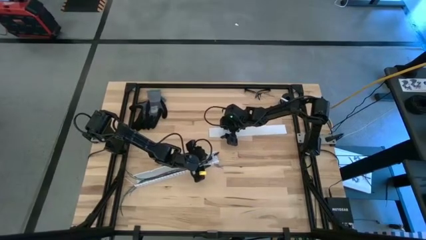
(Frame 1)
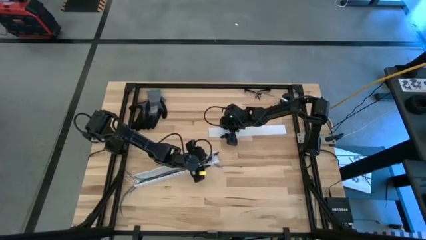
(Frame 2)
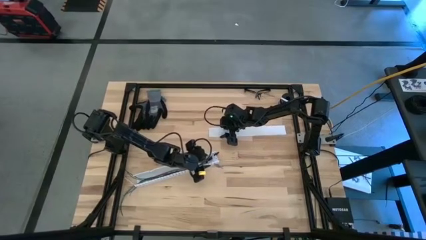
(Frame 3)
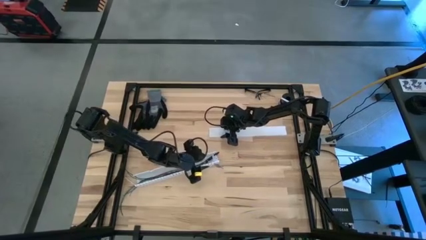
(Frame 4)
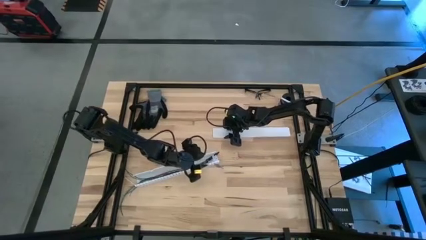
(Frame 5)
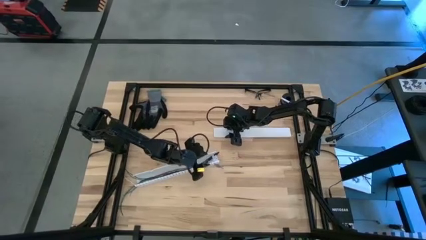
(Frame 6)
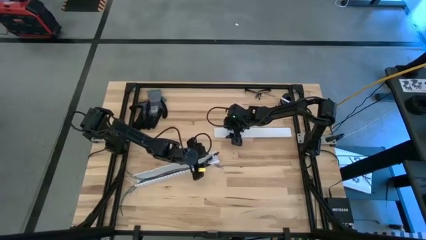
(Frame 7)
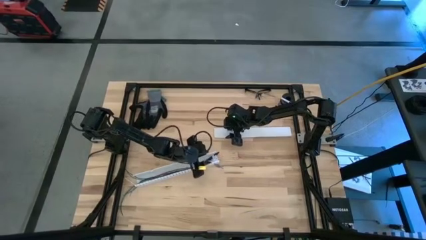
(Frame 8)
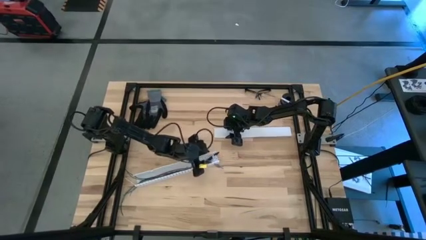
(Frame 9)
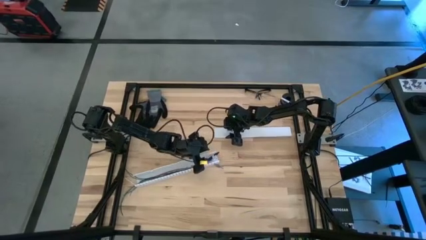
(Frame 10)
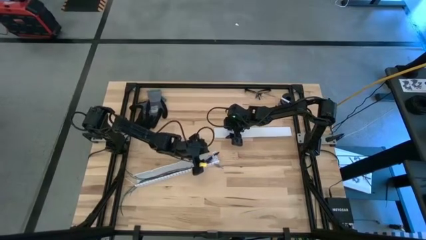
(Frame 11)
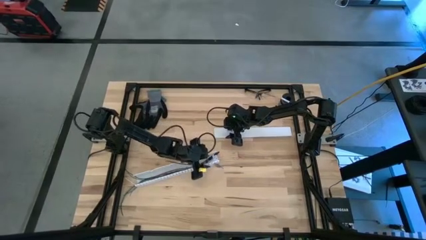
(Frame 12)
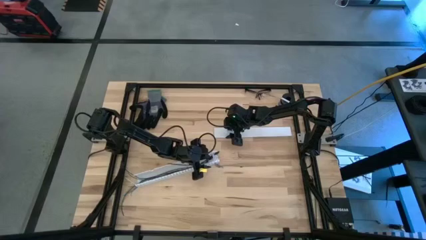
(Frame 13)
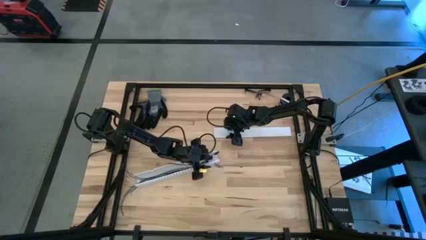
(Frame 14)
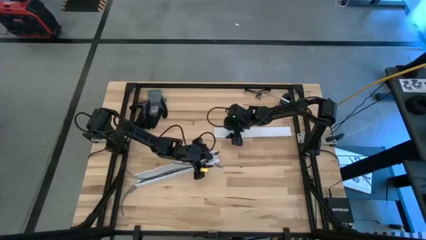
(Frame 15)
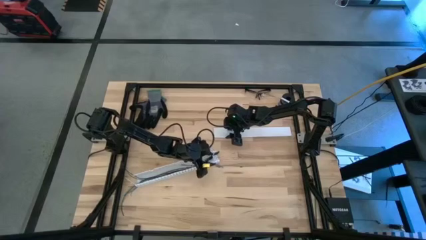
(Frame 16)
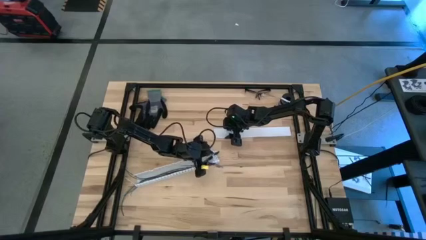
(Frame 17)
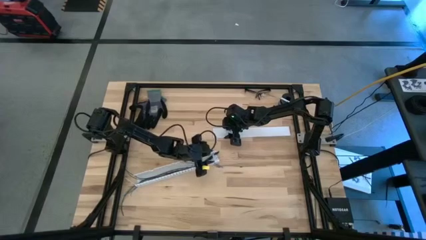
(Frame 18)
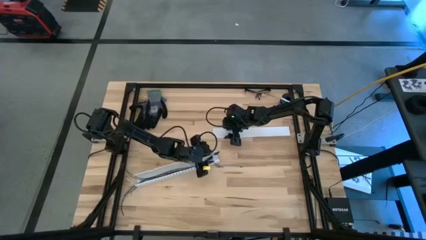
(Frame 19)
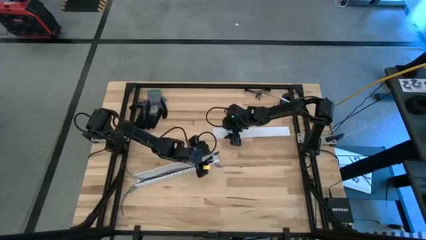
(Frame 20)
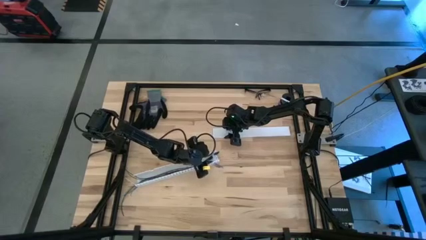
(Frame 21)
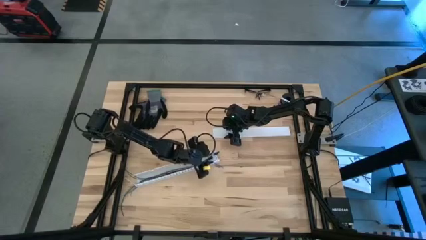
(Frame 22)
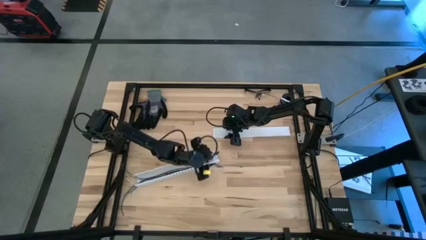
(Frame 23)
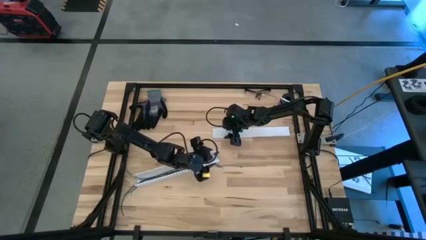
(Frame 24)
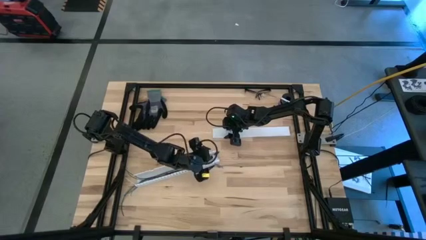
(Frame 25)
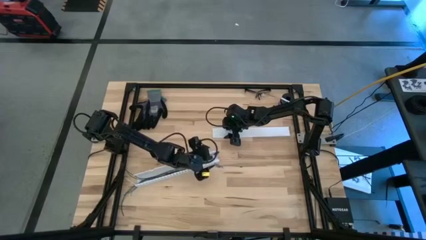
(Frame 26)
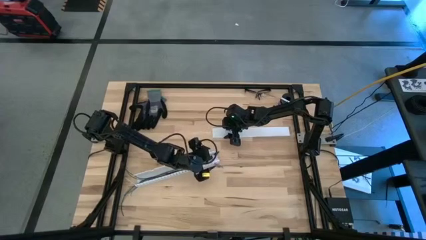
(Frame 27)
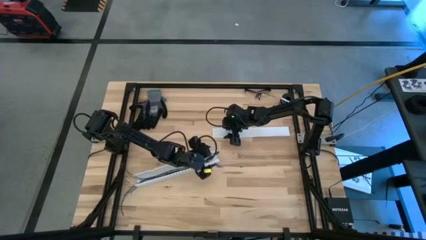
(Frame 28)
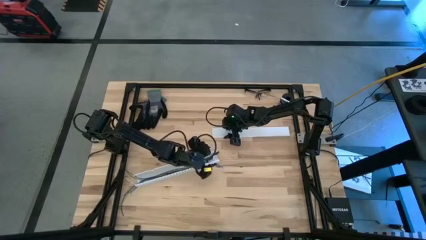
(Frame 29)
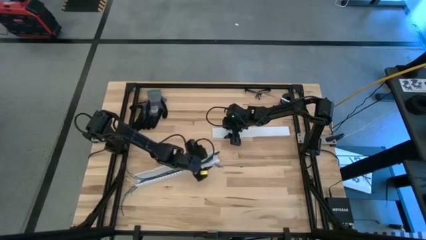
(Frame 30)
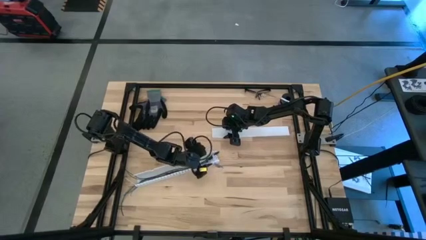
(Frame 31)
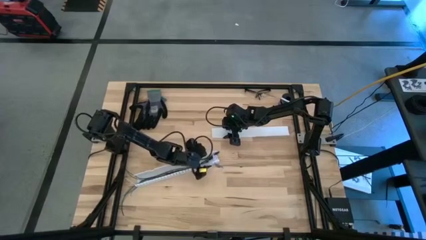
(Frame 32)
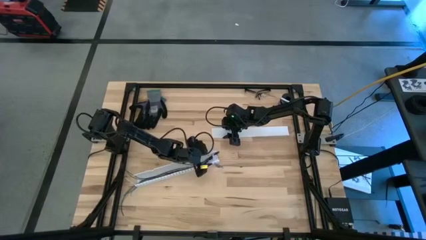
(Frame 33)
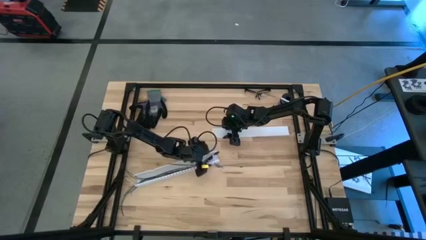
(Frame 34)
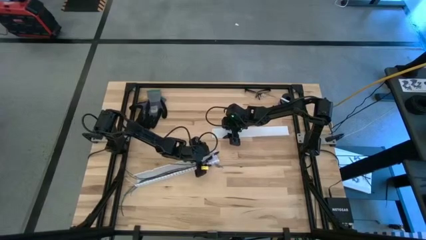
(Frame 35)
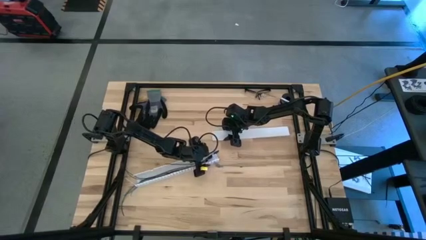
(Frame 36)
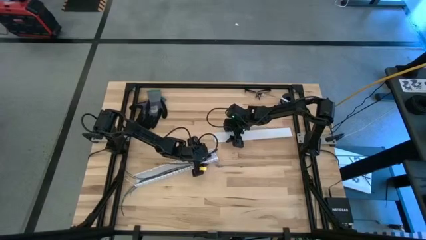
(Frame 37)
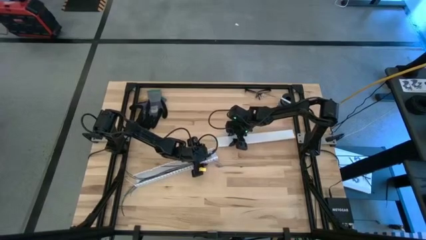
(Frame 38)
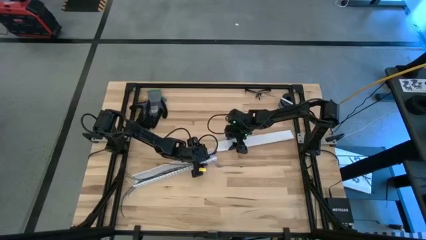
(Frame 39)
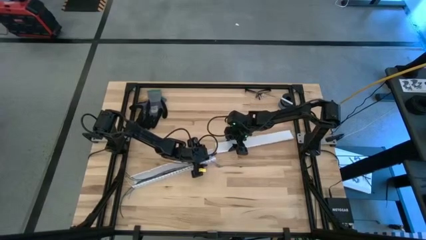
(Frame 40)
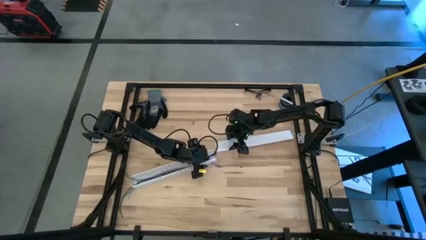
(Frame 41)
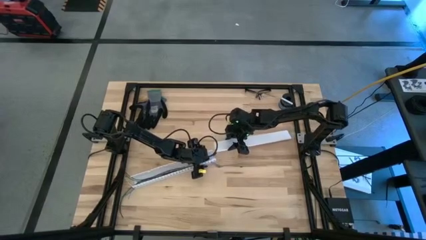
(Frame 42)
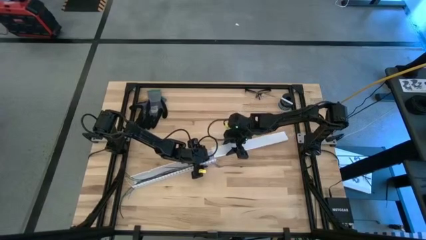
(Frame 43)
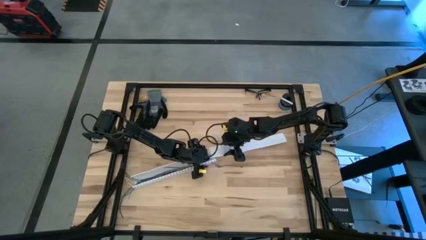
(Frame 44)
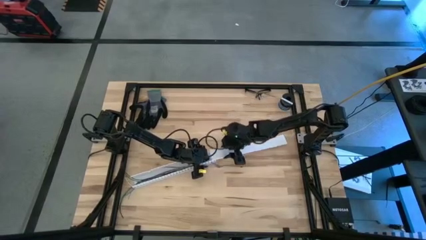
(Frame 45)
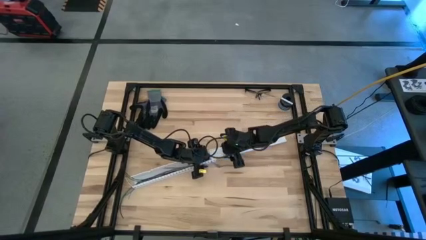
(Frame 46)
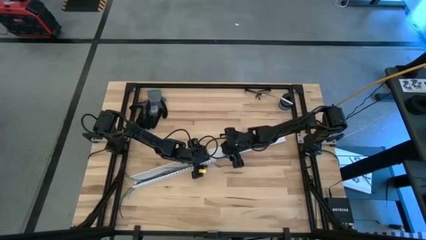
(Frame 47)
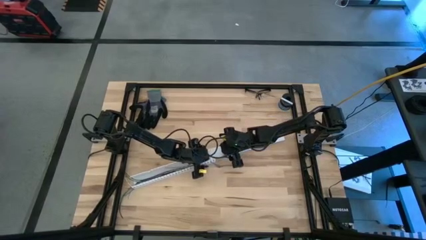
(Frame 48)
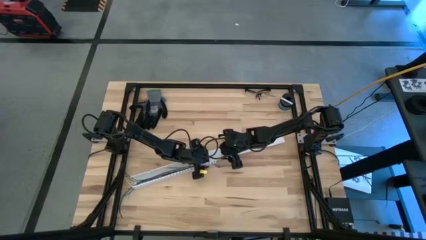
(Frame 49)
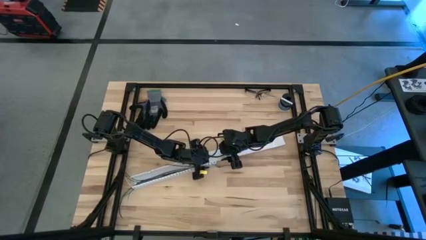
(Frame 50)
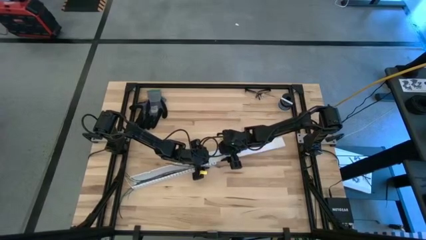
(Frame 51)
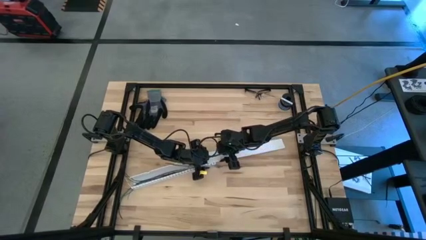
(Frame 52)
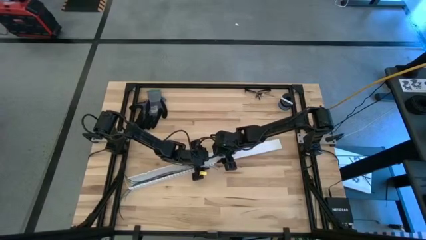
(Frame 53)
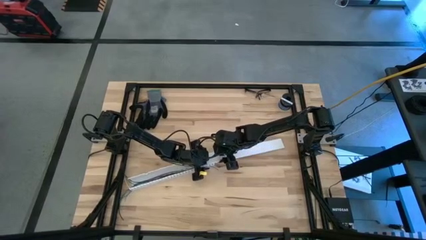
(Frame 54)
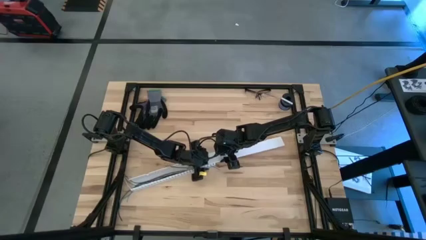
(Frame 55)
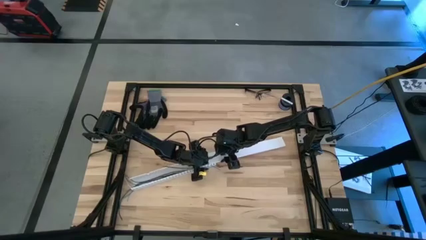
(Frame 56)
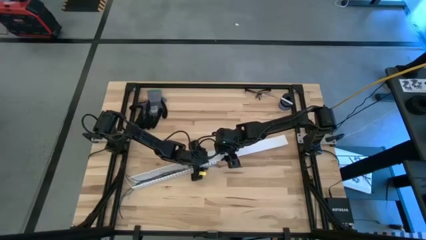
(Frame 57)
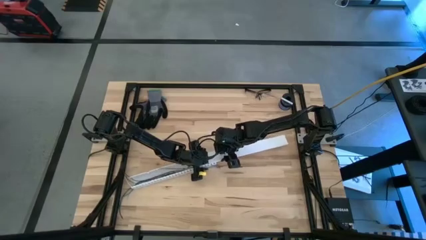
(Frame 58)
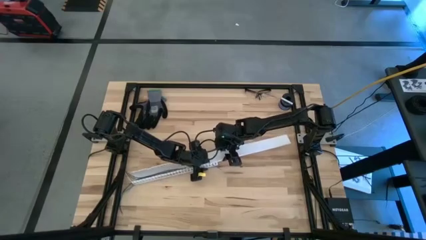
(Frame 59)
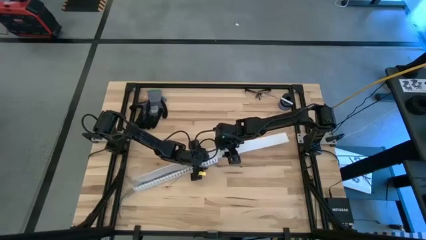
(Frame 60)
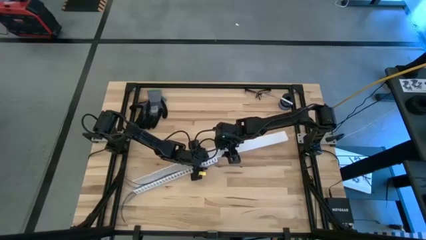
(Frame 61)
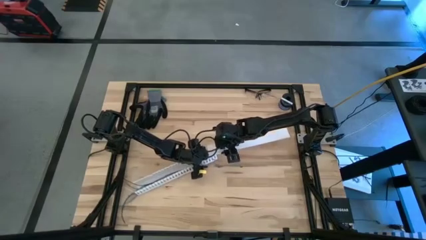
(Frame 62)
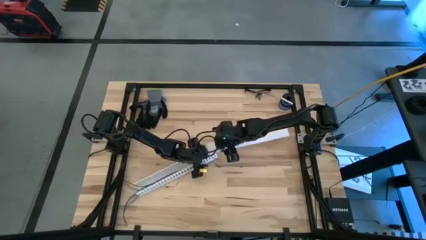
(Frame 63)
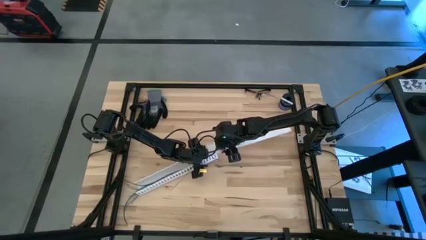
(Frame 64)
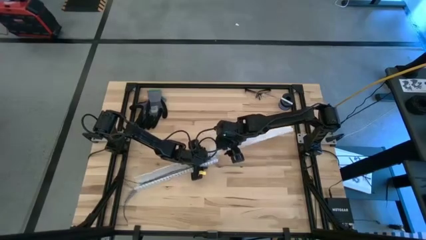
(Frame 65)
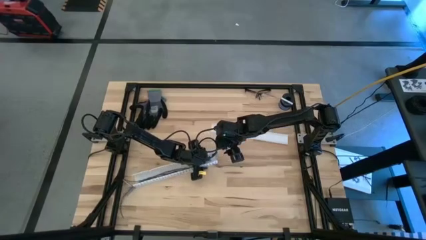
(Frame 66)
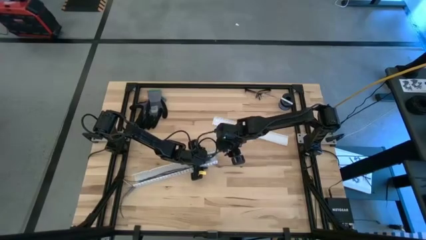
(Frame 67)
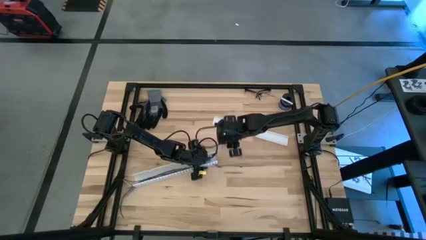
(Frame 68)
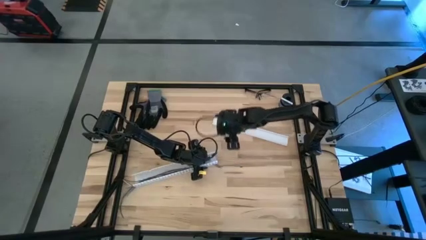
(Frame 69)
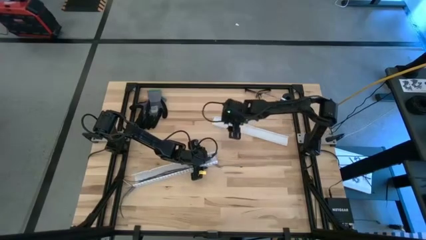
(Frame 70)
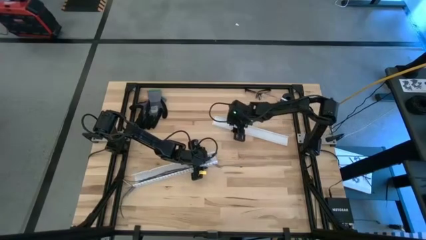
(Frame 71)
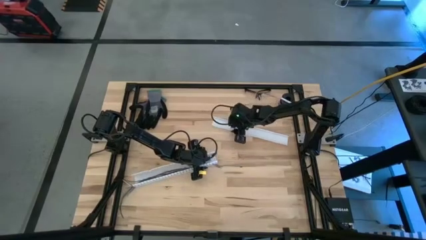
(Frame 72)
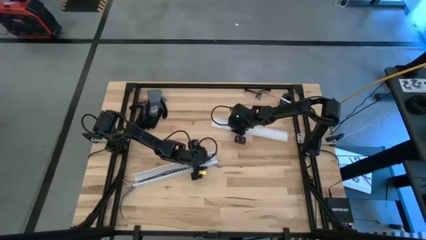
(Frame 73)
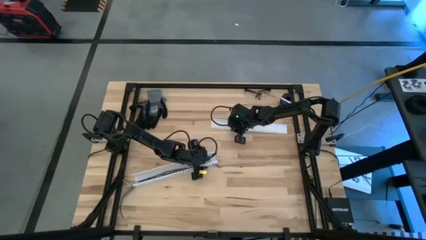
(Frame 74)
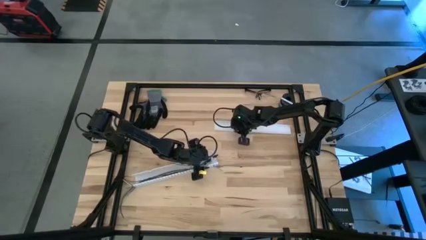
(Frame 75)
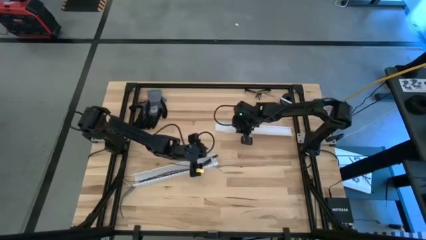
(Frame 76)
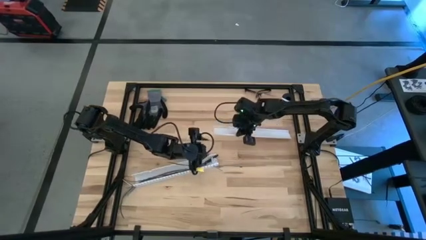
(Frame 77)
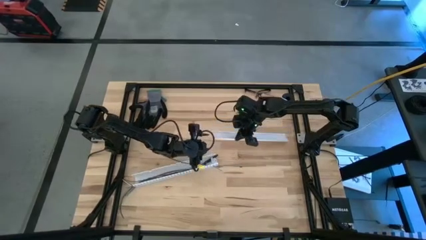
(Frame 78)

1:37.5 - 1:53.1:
Task: Ziptie cables
Close the white cable duct
